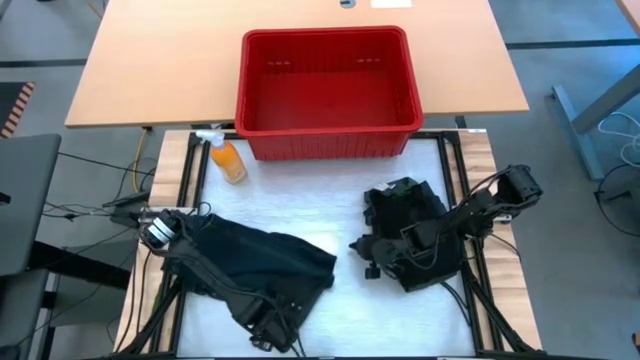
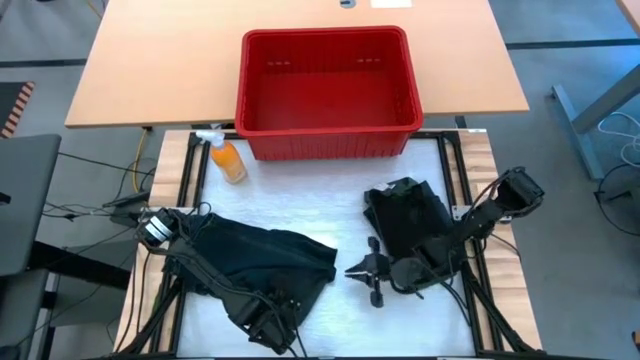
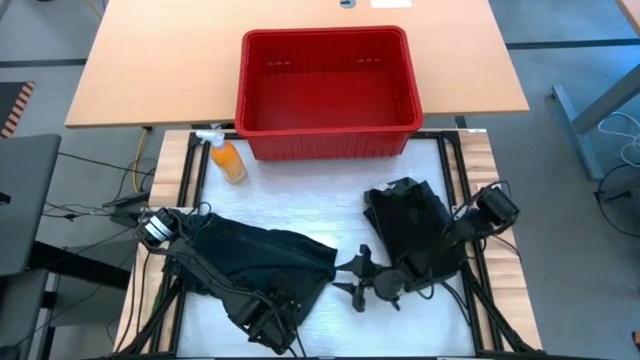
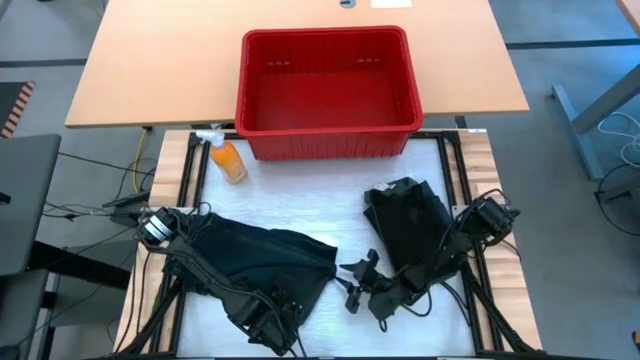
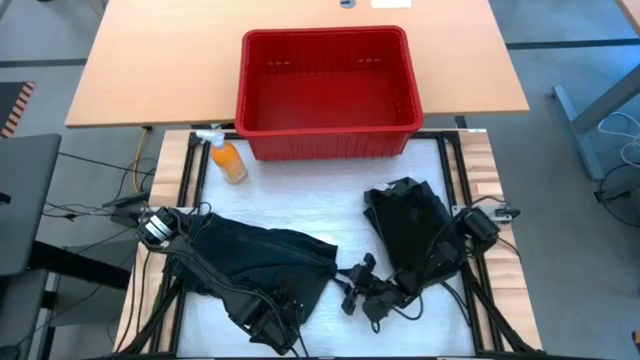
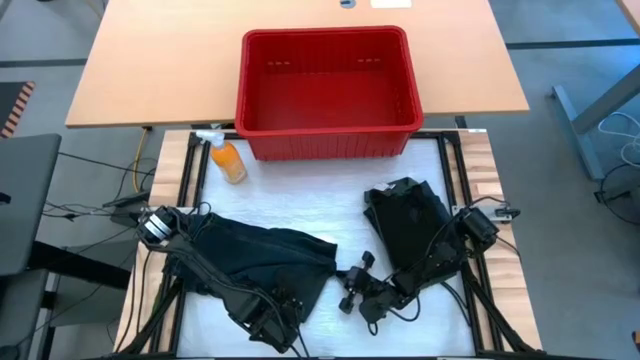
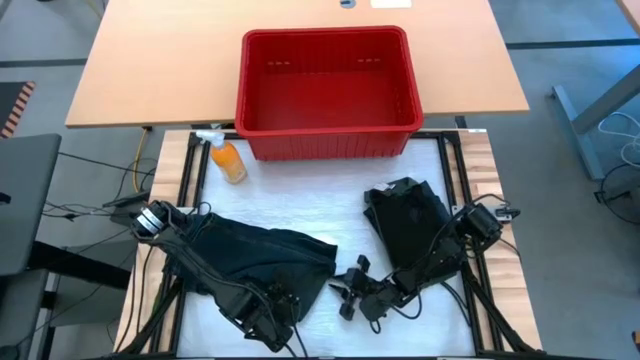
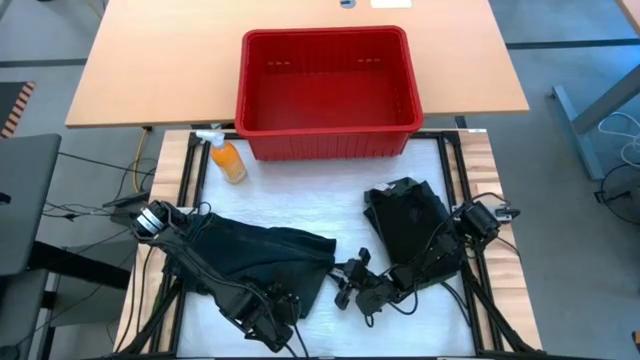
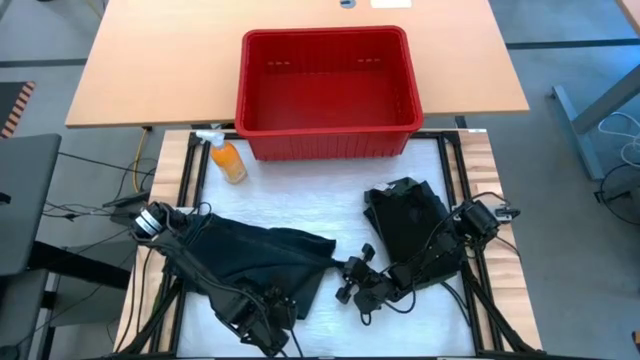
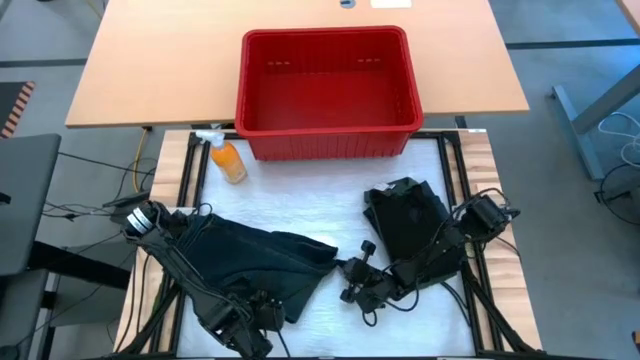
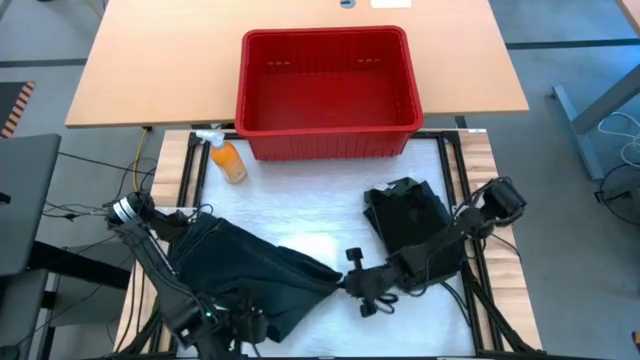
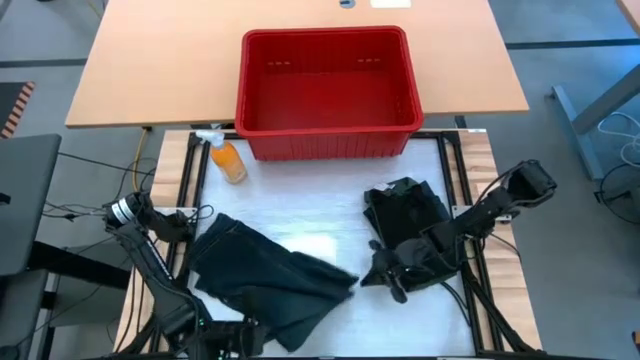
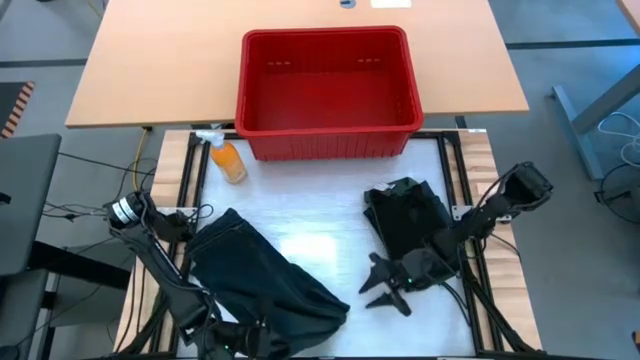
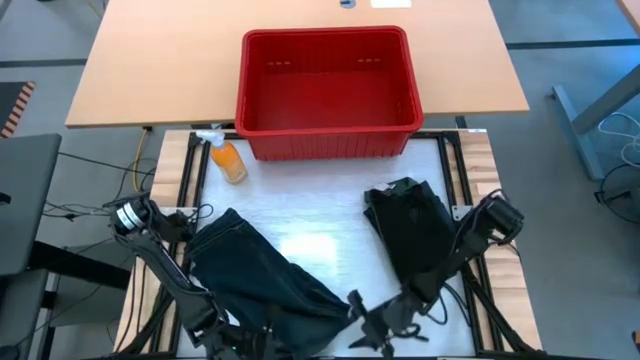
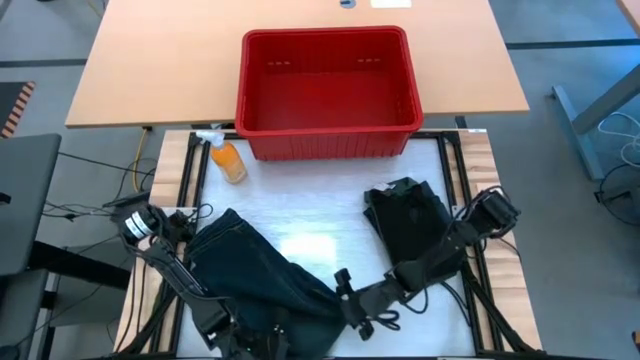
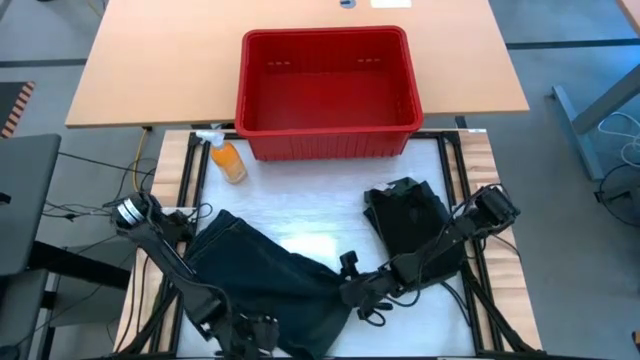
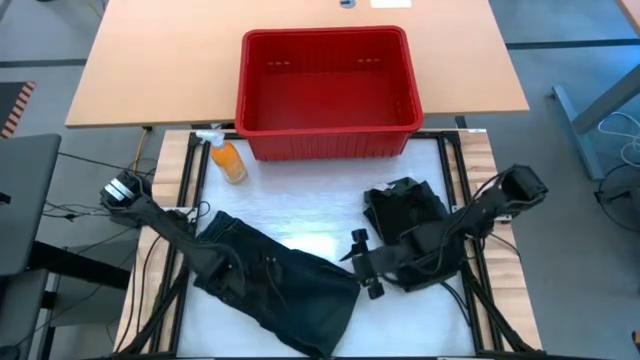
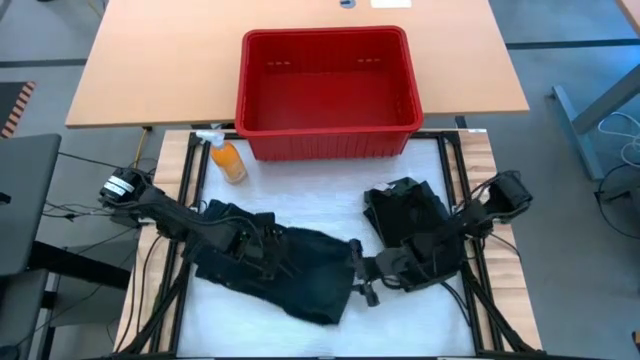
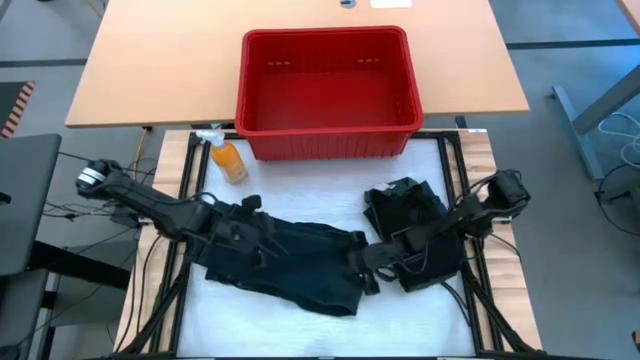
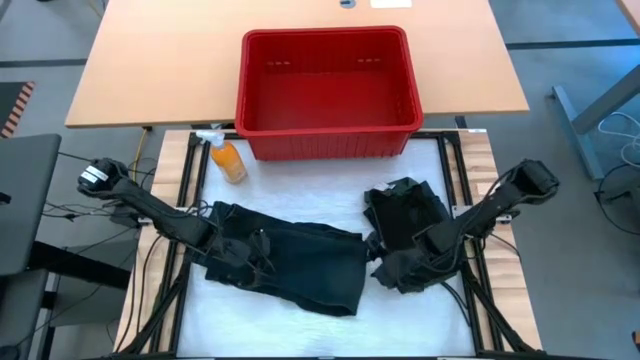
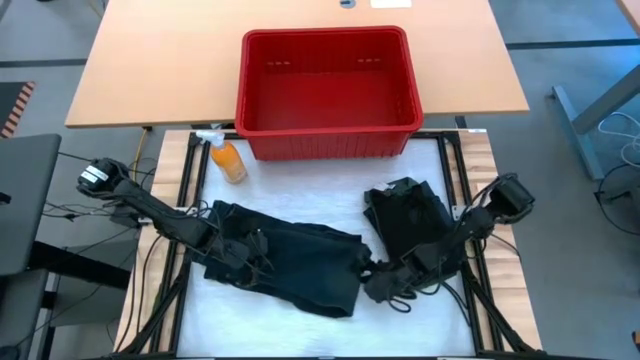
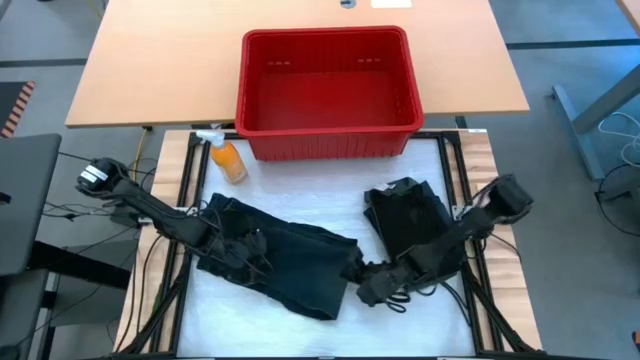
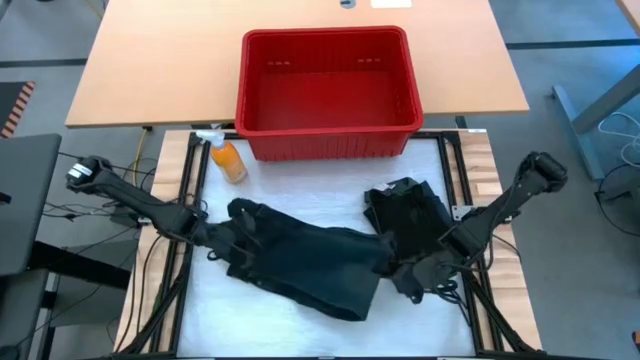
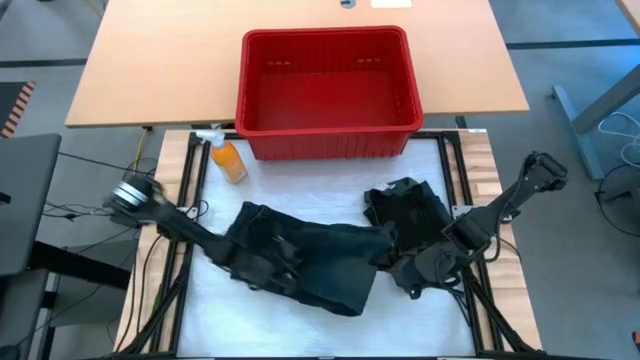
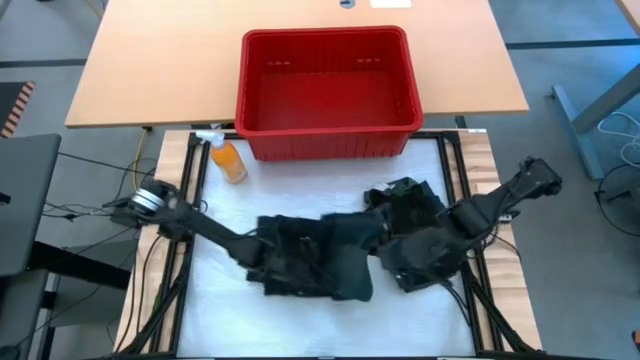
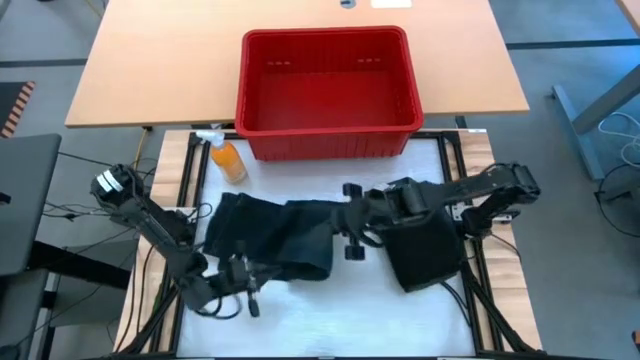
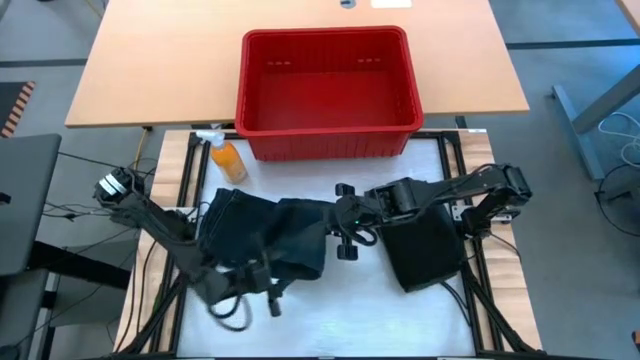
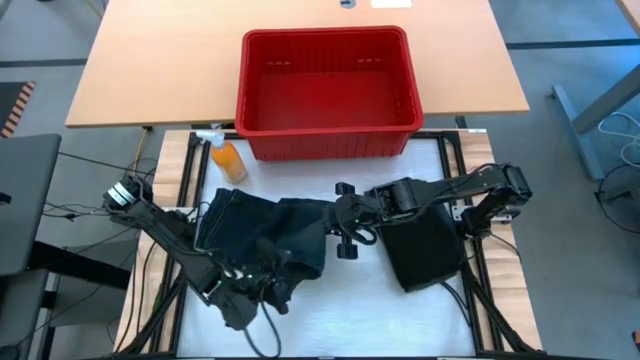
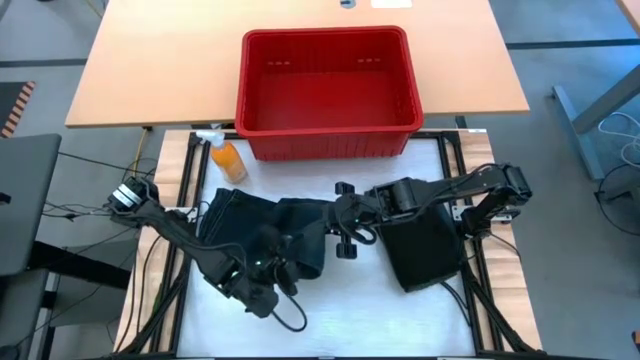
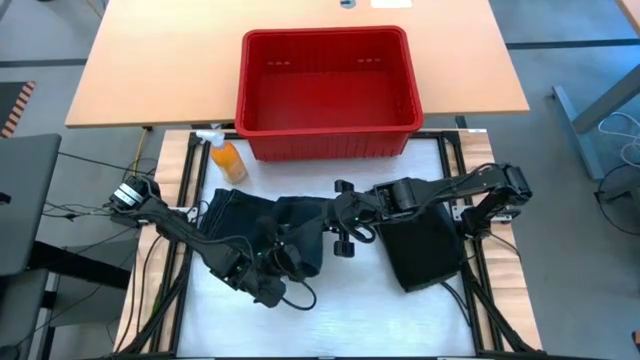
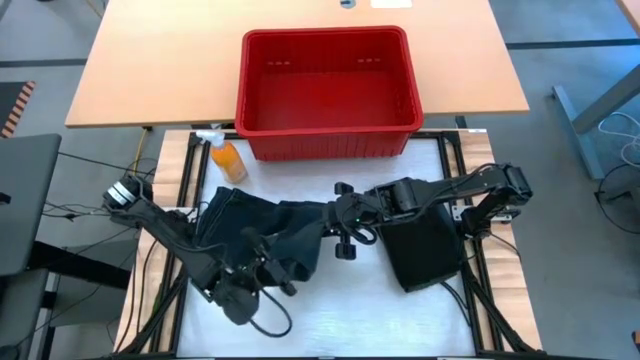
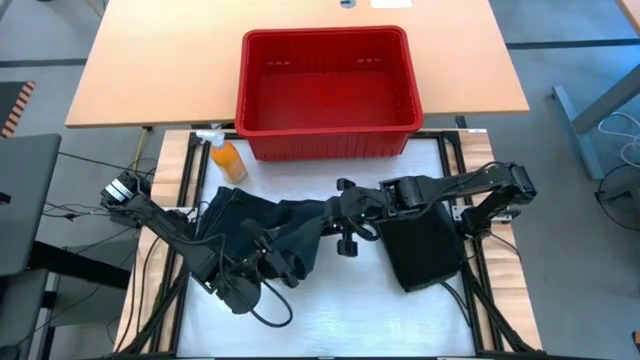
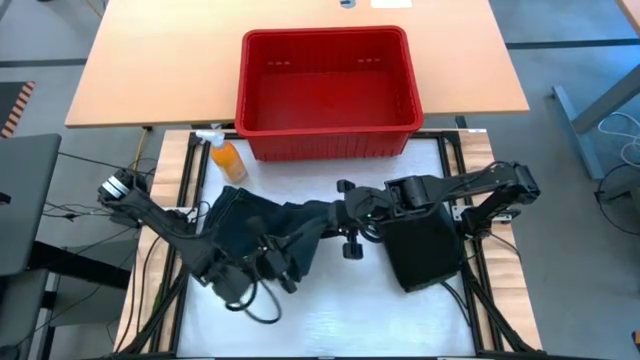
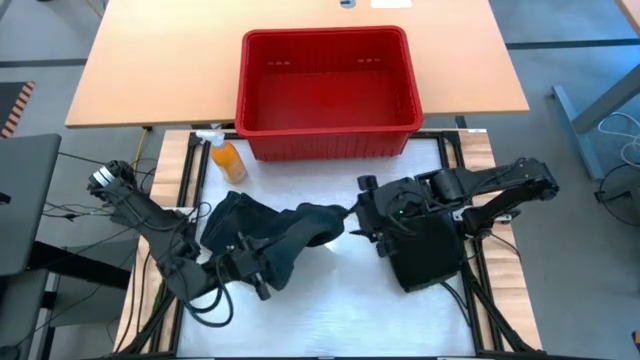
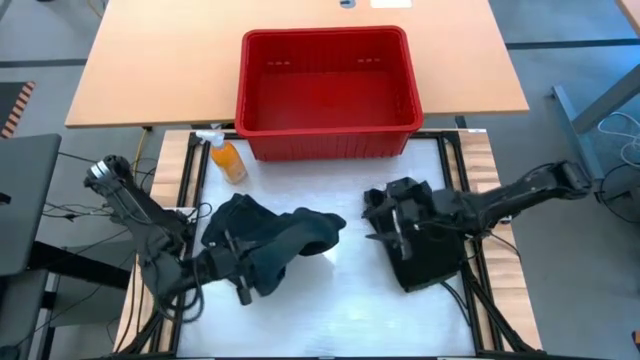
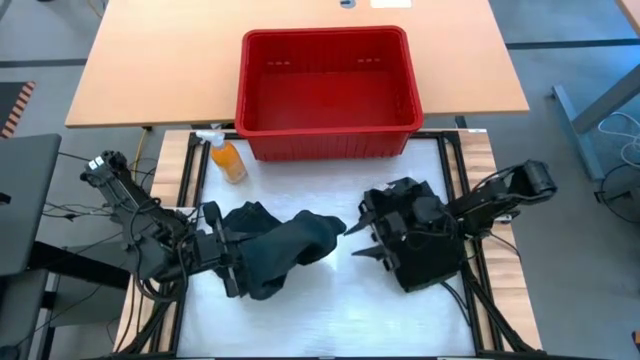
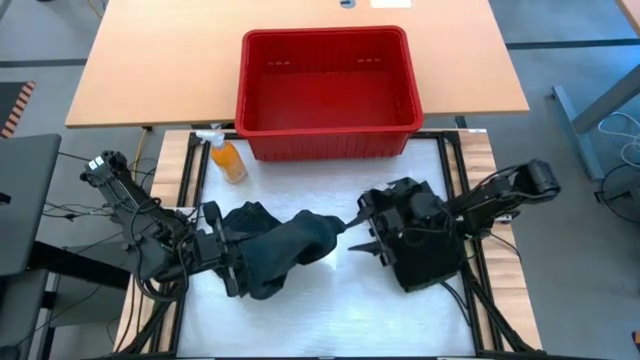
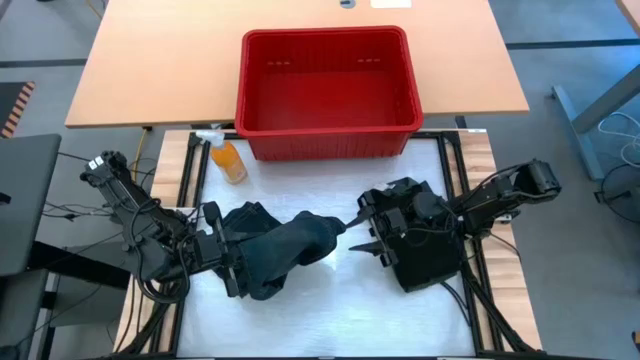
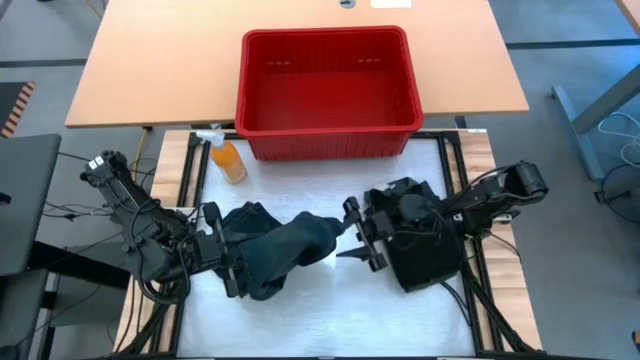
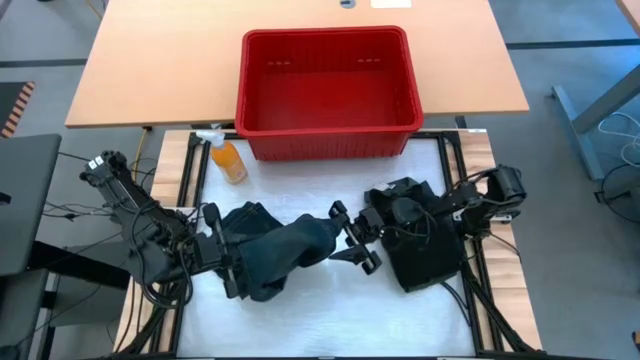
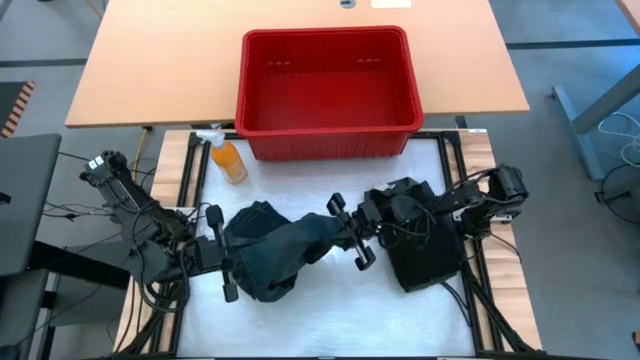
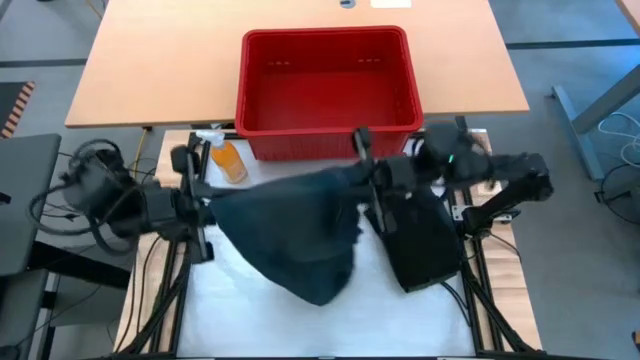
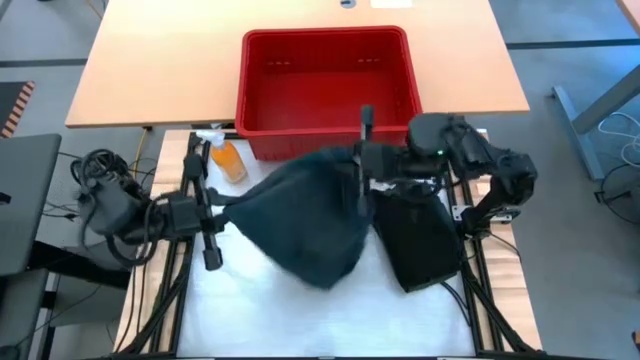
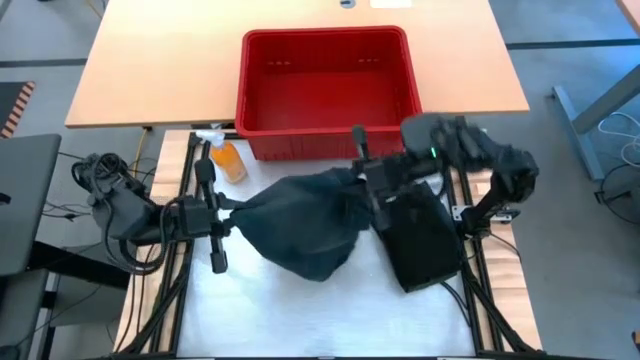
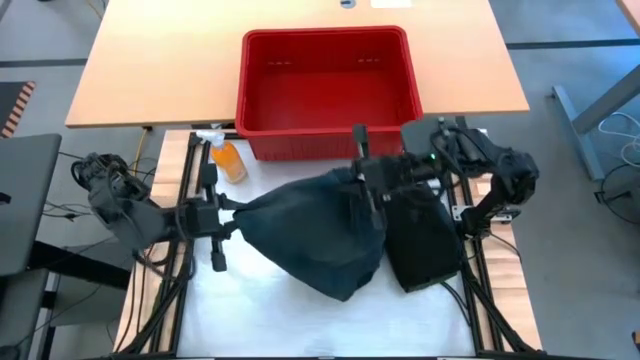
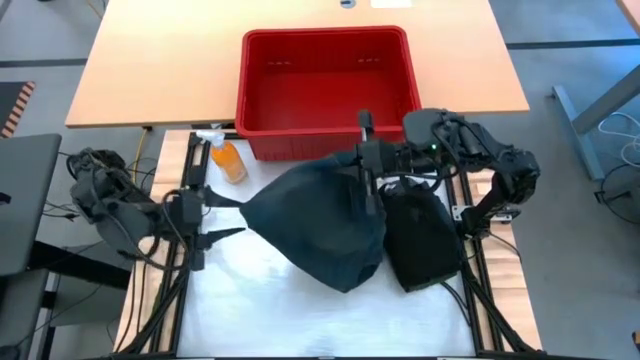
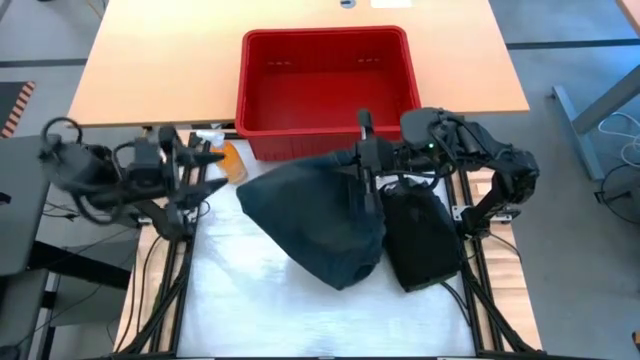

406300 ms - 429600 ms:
Task: Fold laundry
Fold the dark blue jeans
